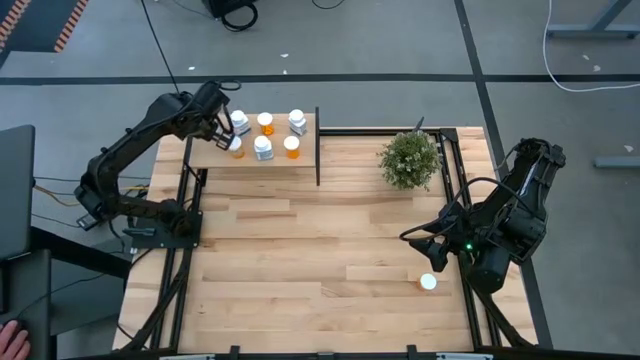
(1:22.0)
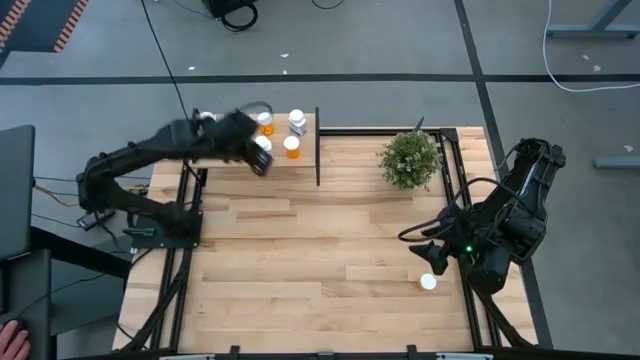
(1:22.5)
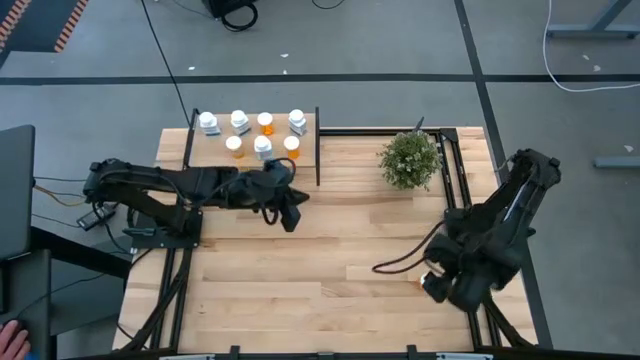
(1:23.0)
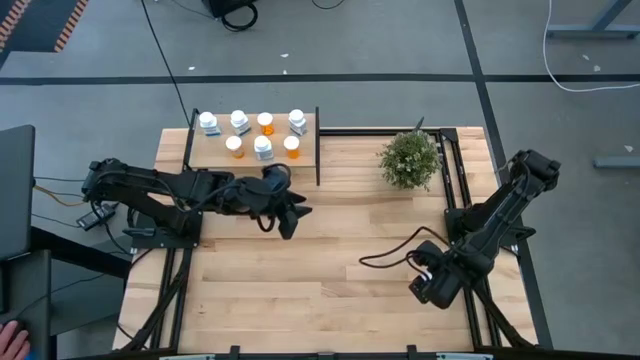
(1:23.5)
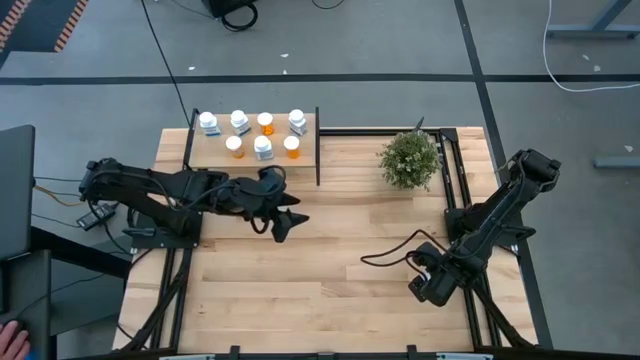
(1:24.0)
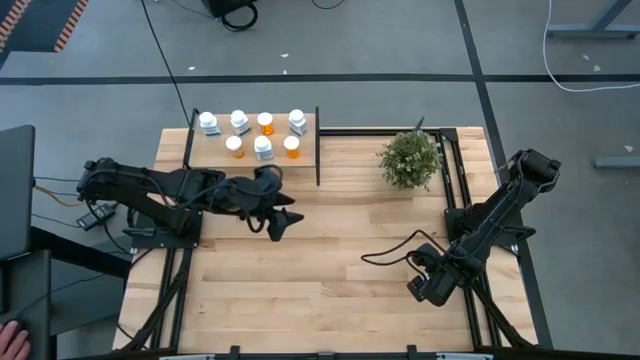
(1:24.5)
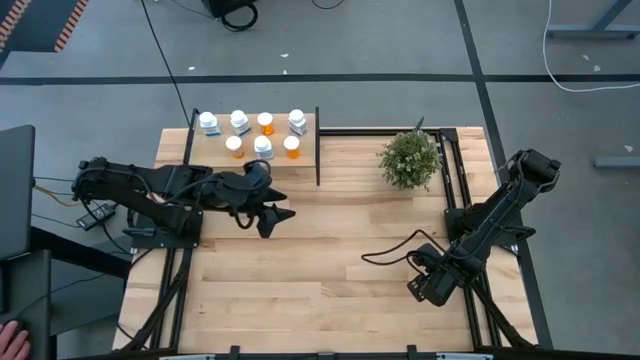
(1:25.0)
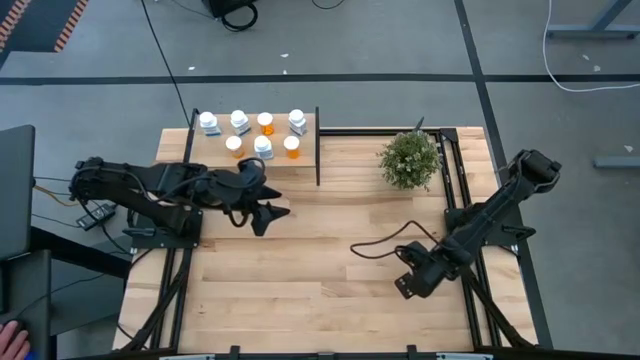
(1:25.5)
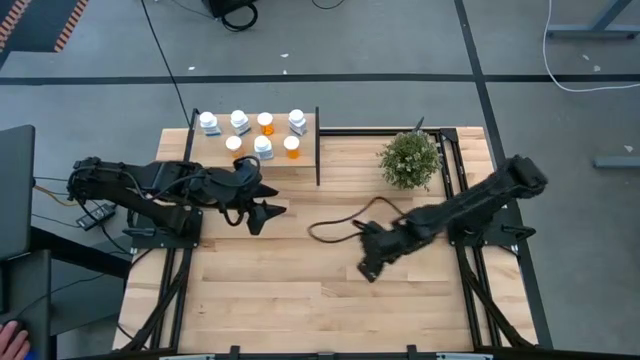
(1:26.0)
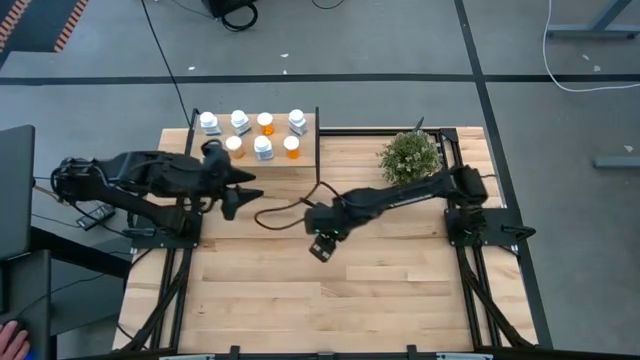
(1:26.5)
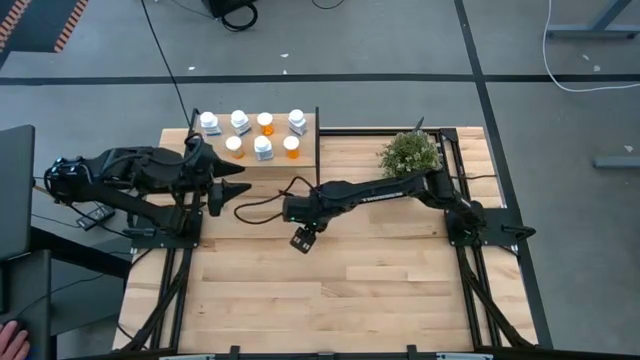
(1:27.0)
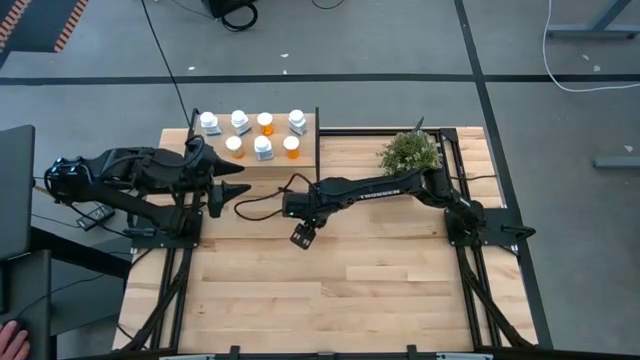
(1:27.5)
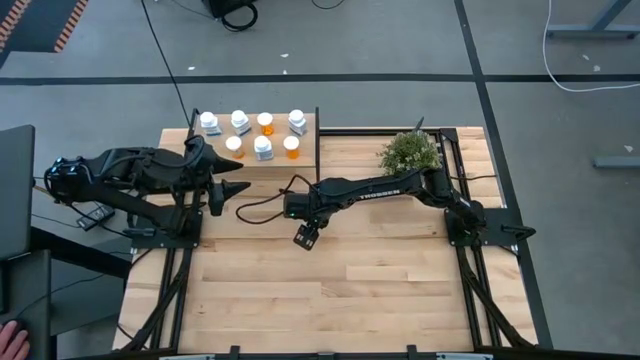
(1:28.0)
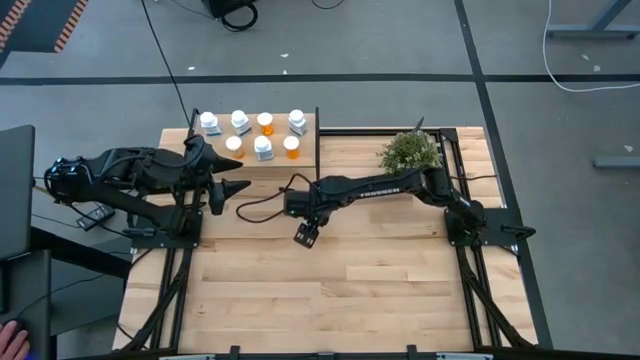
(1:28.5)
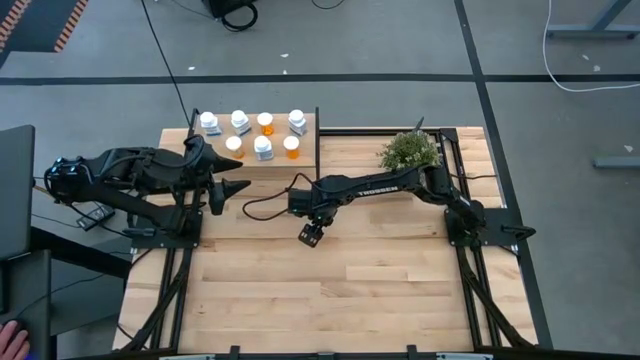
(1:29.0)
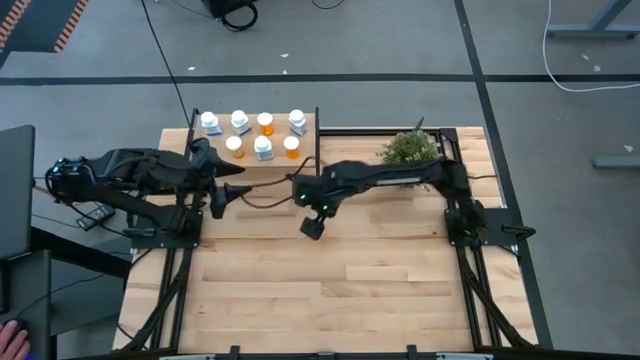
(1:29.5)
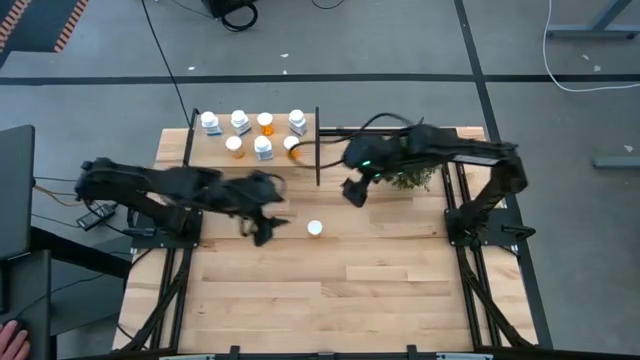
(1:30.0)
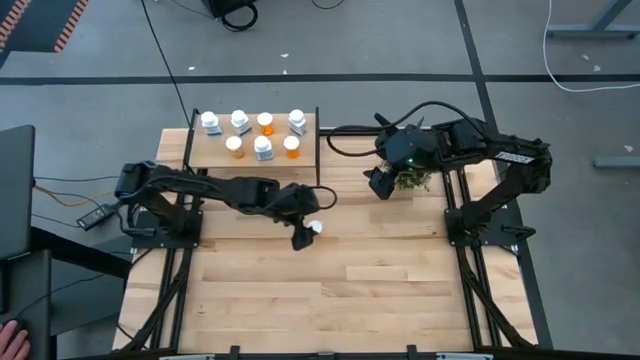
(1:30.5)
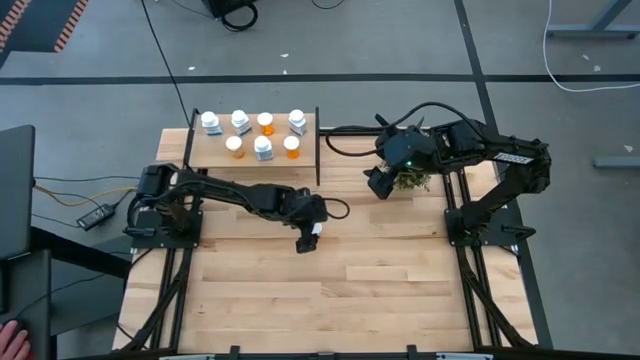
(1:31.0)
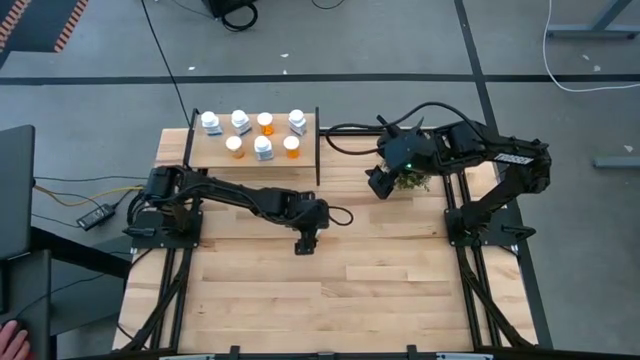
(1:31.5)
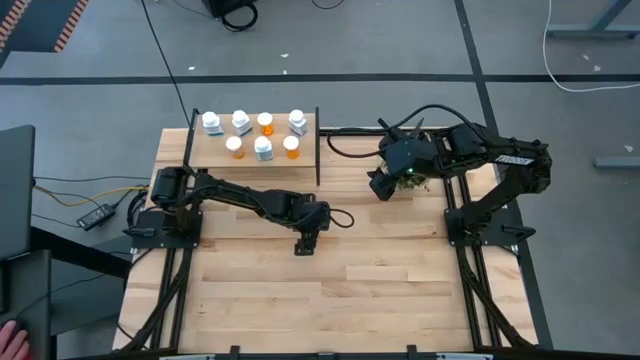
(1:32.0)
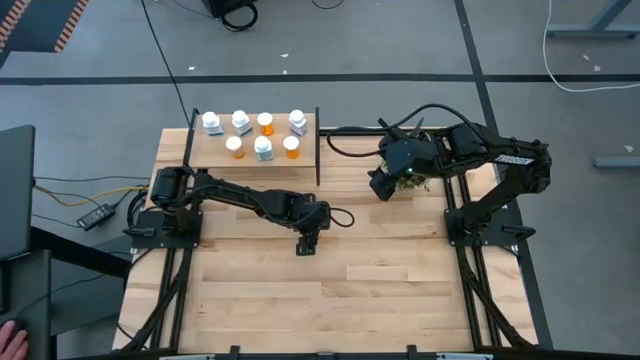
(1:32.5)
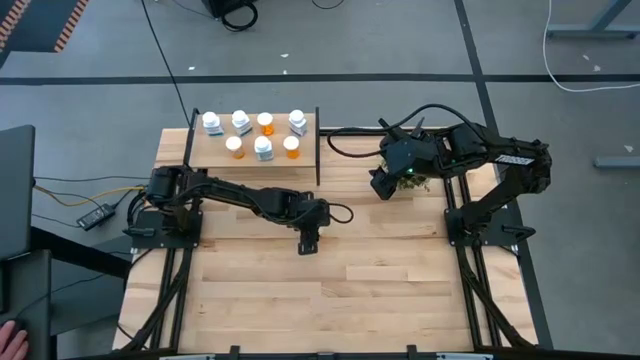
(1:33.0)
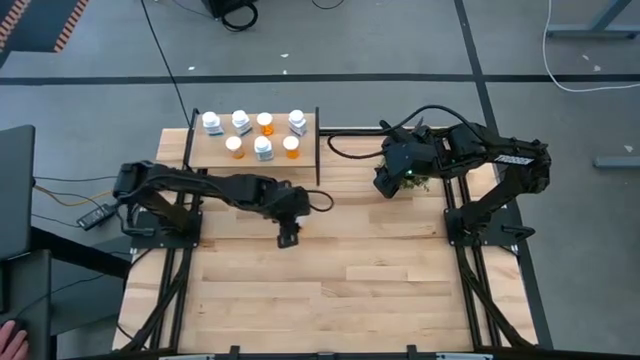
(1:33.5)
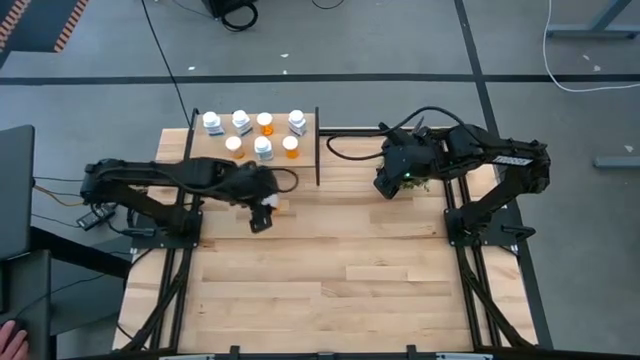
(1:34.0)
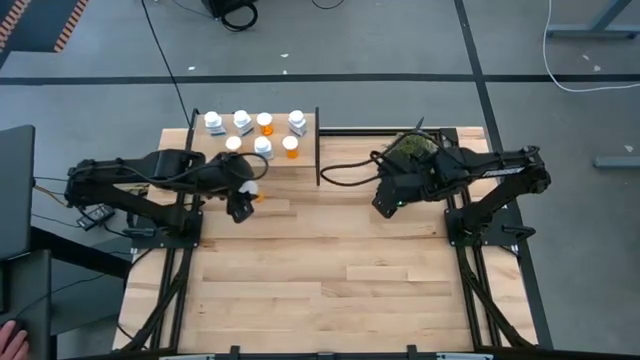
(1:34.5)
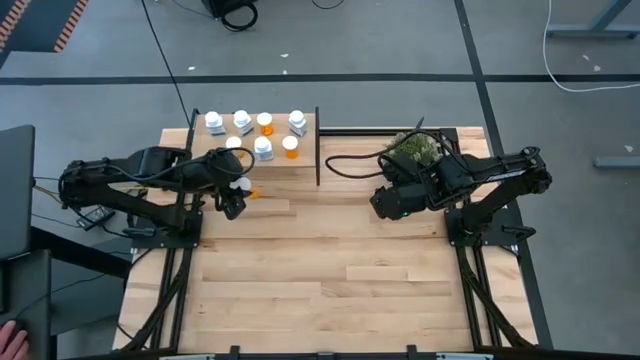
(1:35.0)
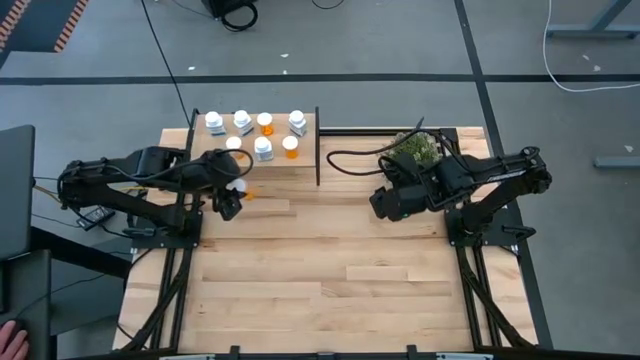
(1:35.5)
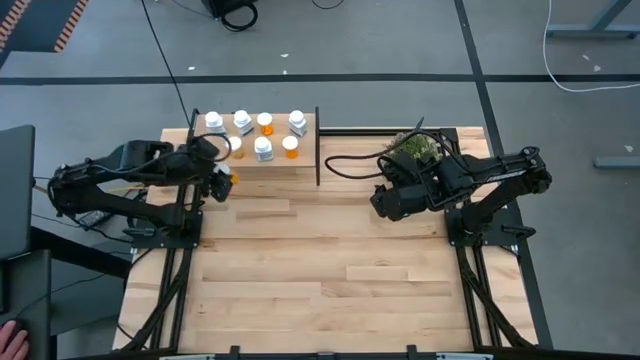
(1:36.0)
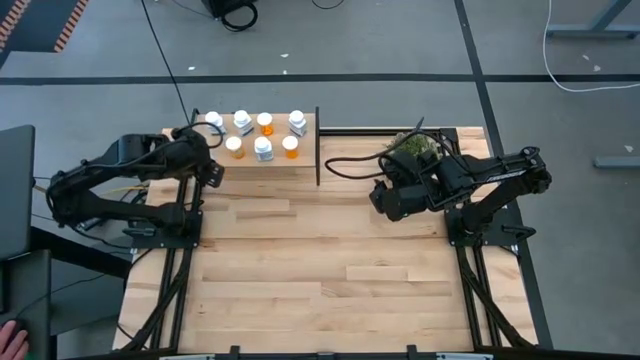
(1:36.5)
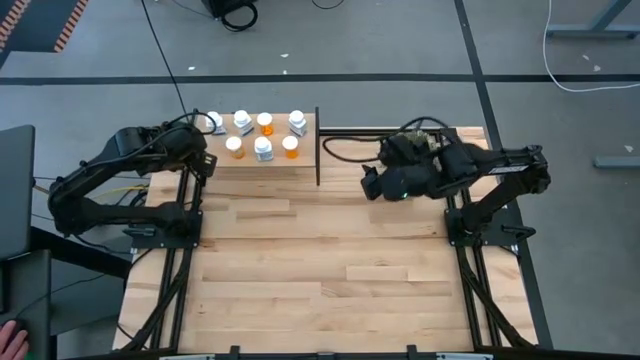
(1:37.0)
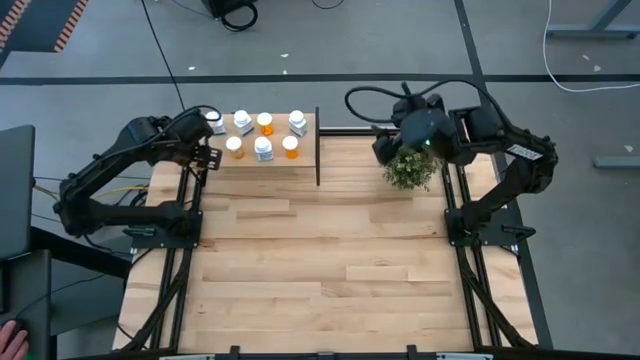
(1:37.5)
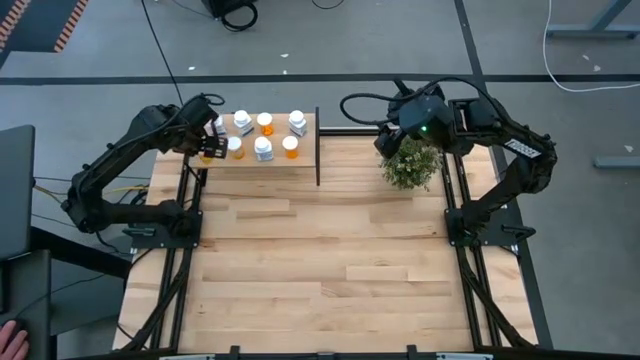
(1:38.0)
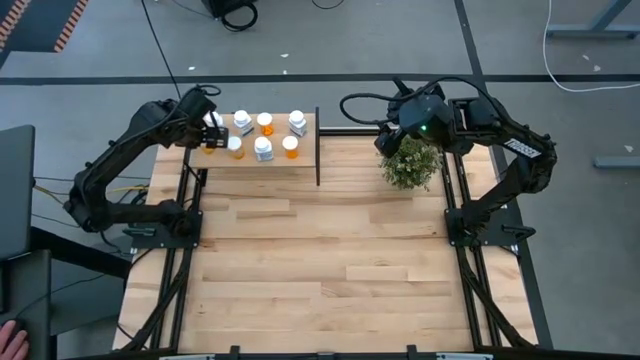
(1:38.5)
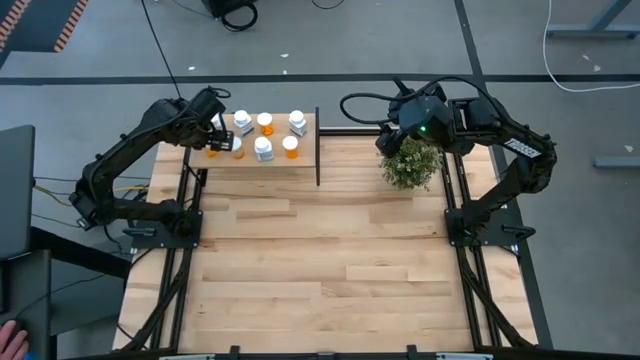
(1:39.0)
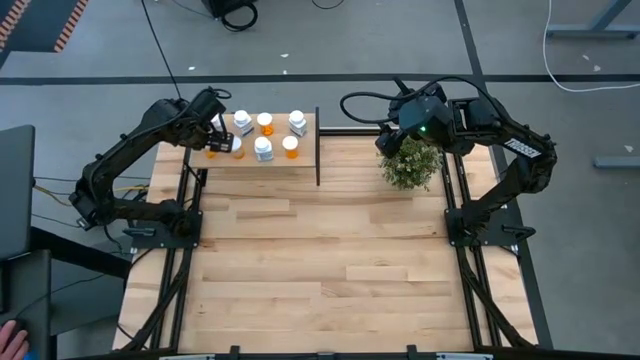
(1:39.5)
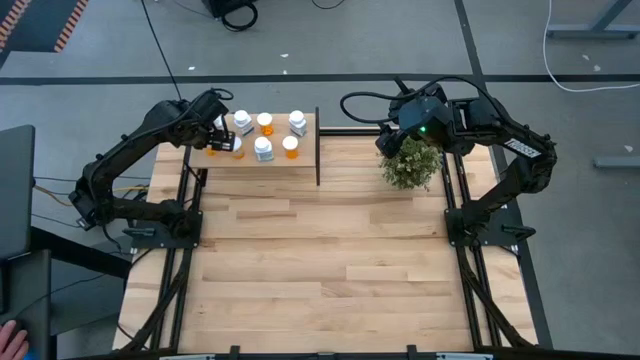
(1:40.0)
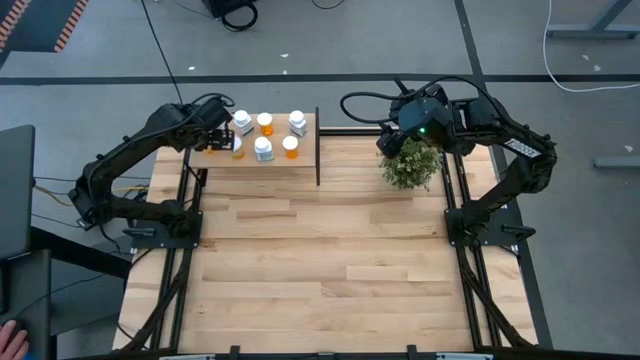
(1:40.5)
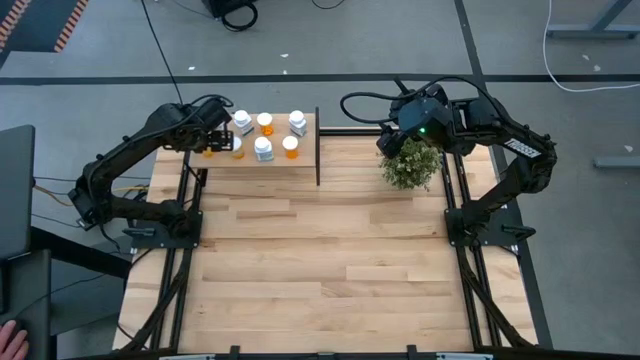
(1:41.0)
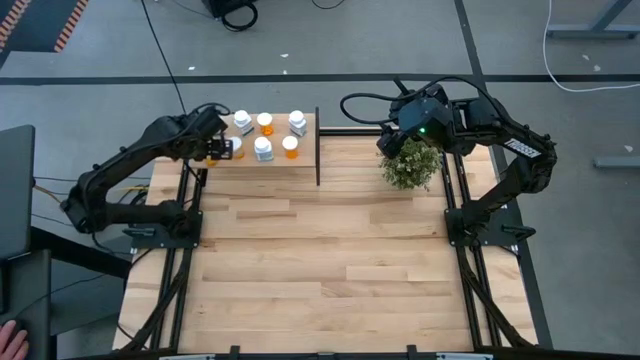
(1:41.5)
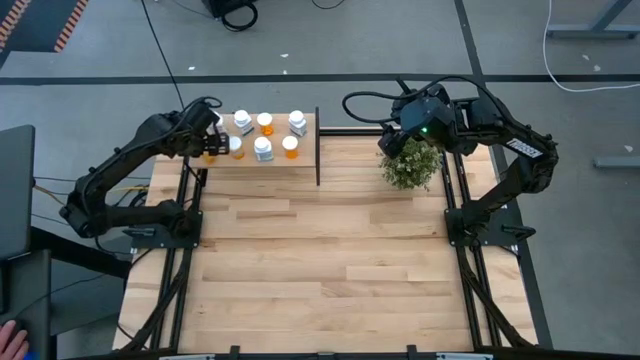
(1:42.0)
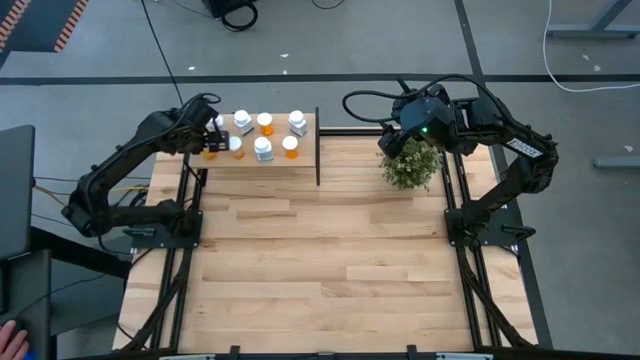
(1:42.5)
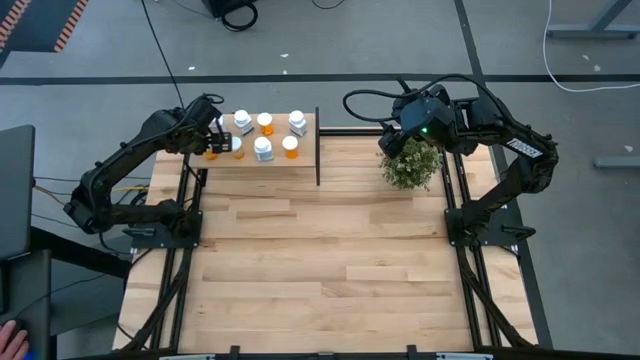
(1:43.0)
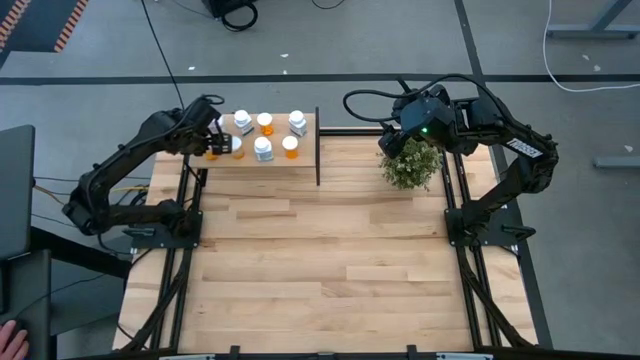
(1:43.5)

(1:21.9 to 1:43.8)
Task: Pick and place medicine bottles onto shelf by color
Put the orange pill bottle on the shelf
